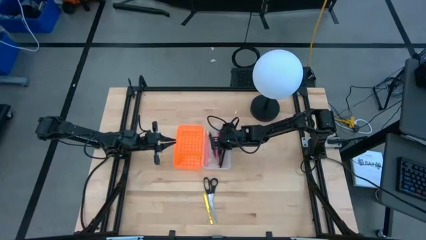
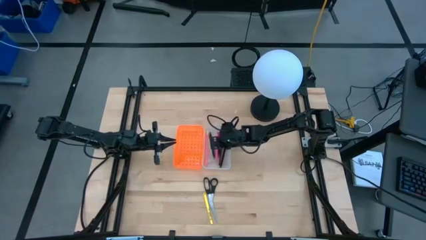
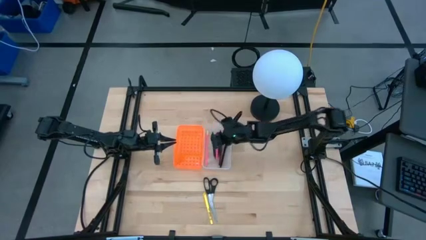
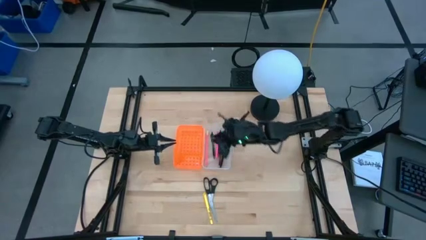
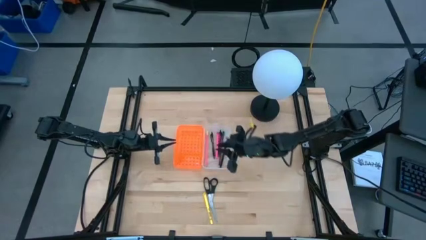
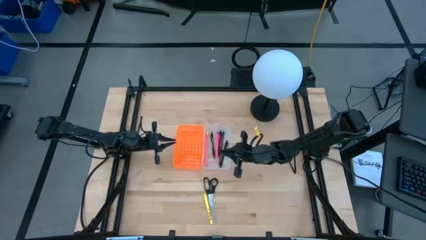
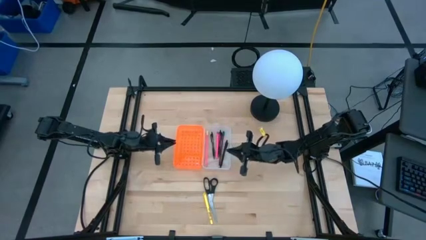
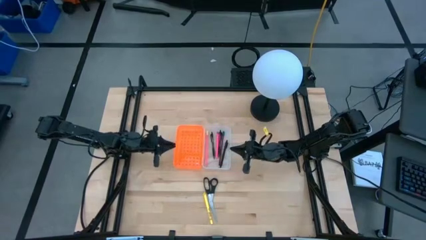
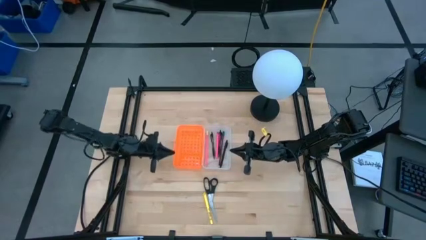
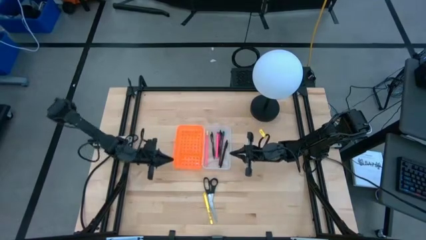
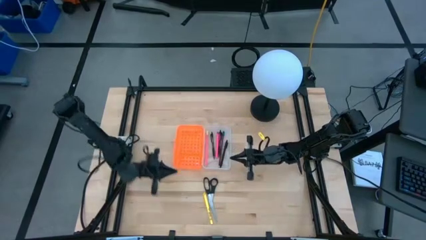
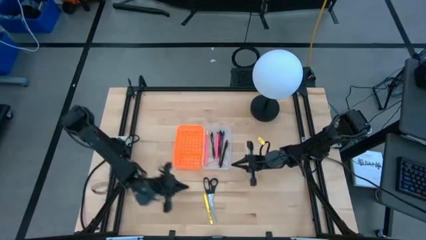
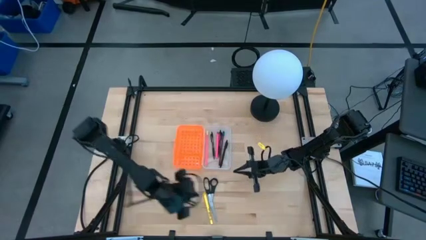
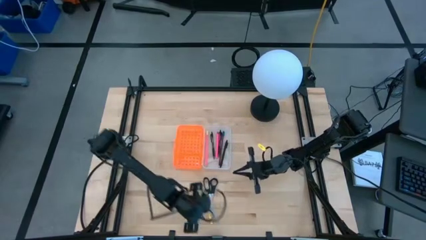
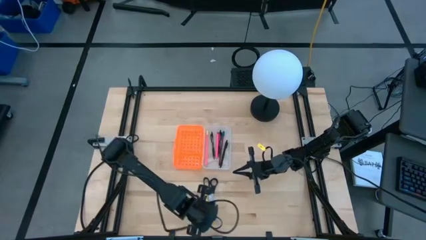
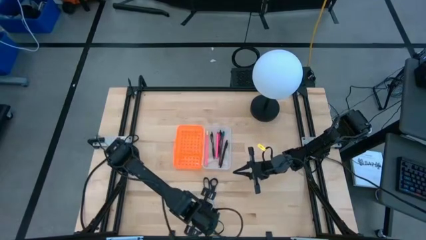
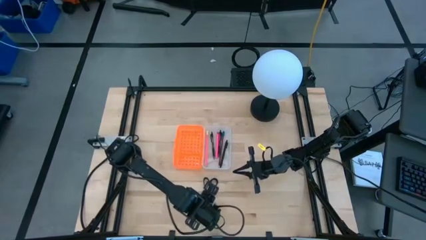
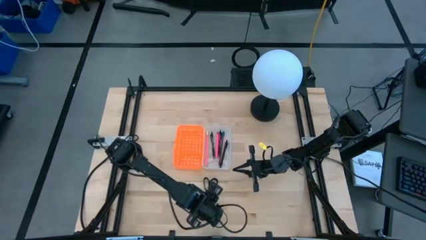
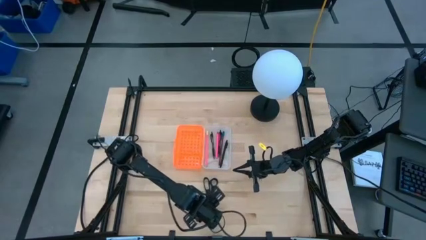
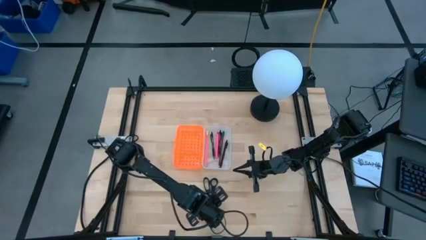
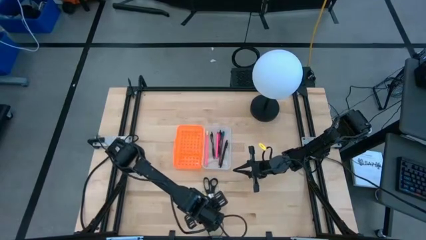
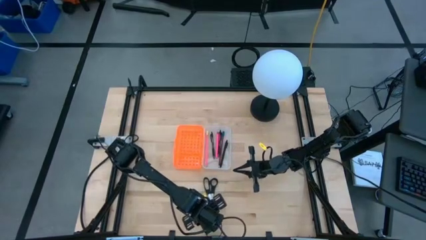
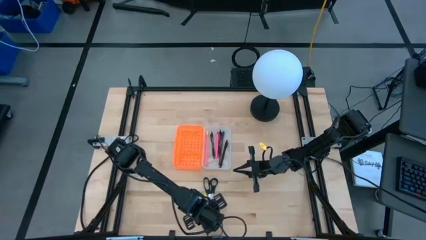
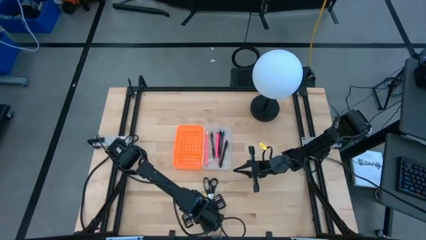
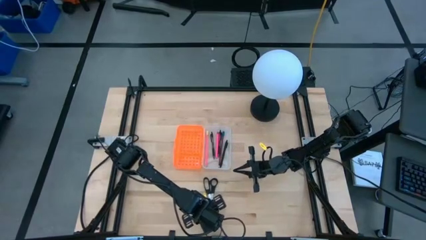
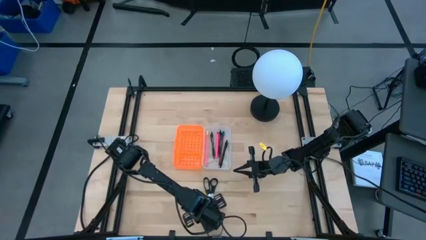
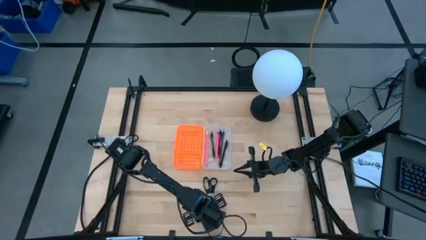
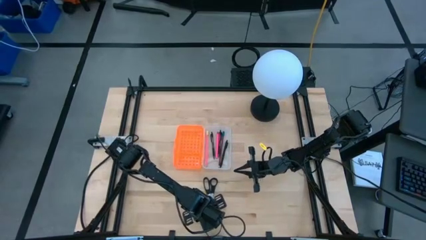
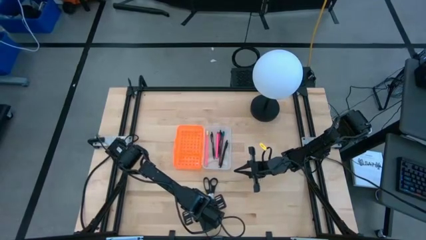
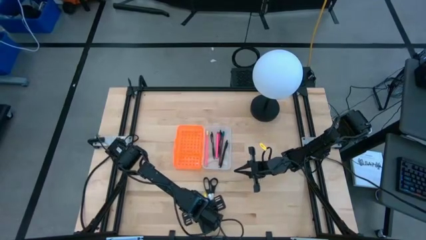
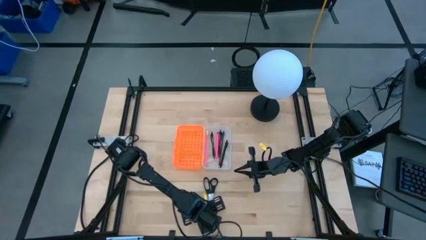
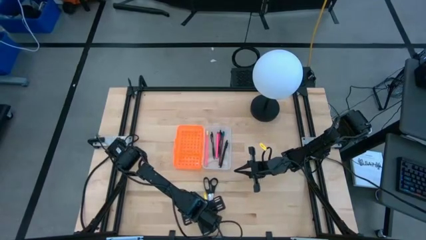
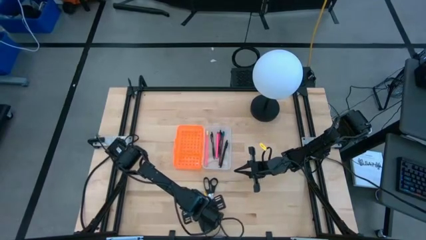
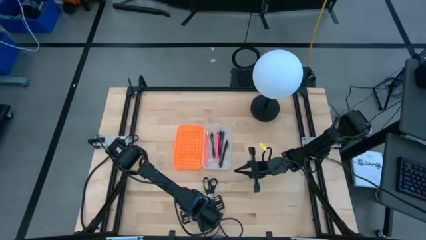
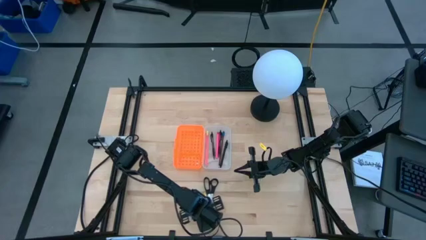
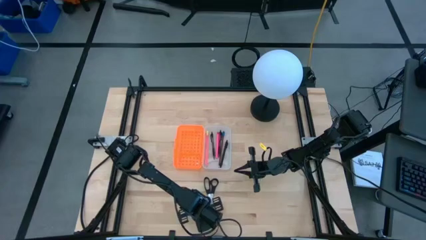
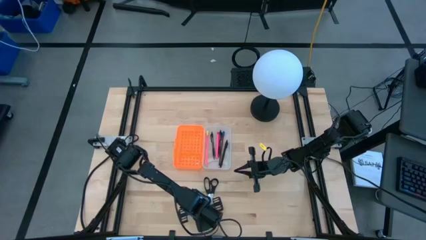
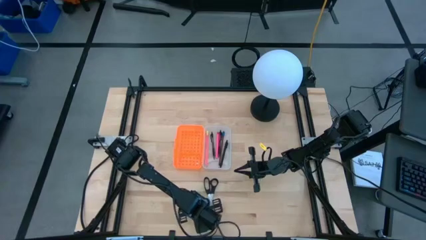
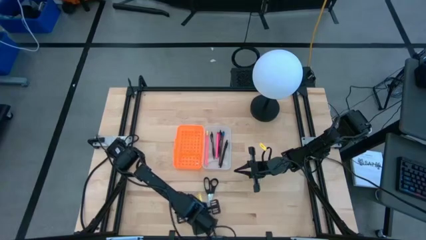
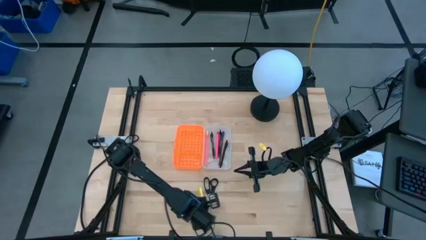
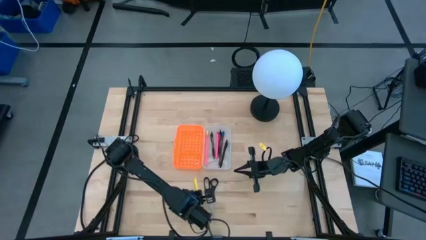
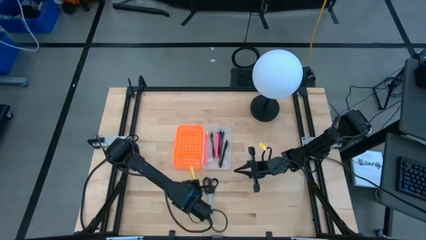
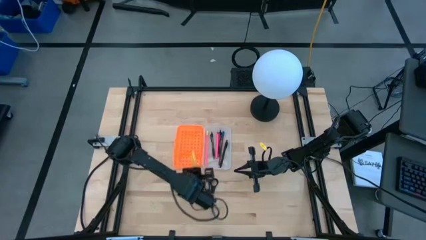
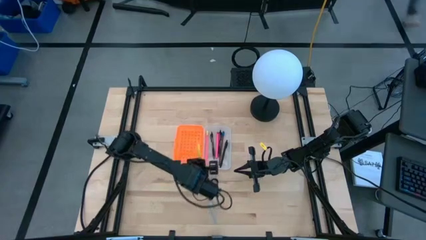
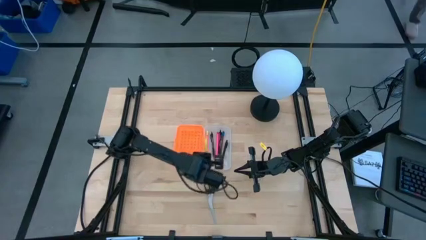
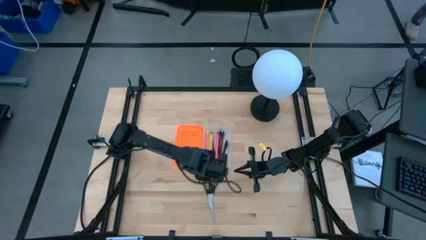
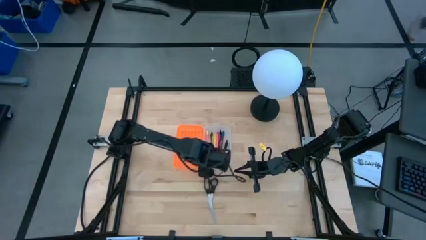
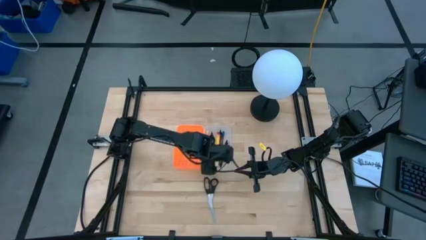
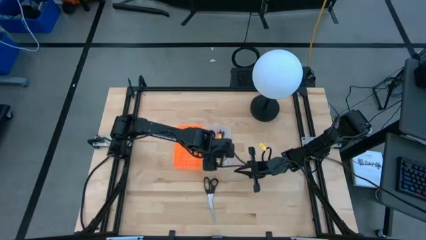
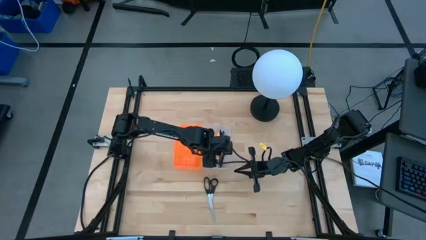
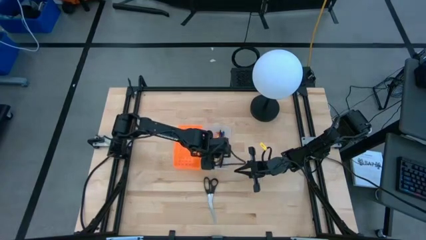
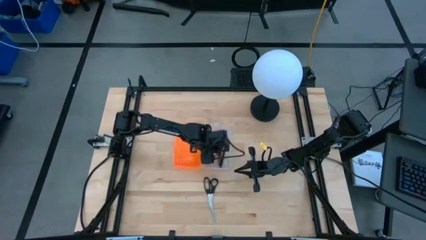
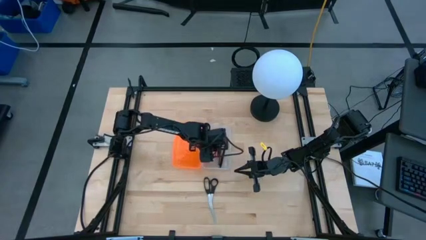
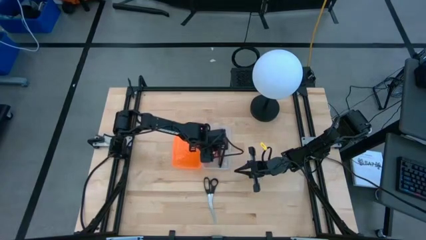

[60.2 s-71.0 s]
Task: Pick & place school supplies into a supply box
Put the yellow marker pen into the supply box
